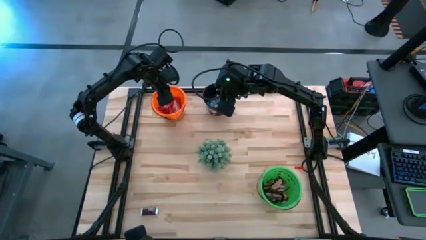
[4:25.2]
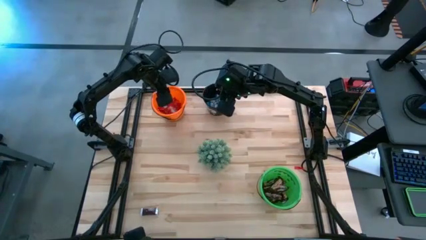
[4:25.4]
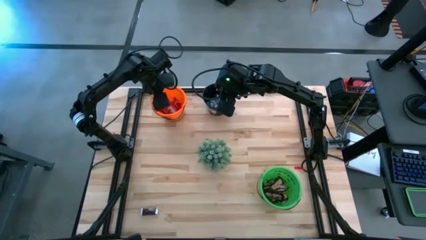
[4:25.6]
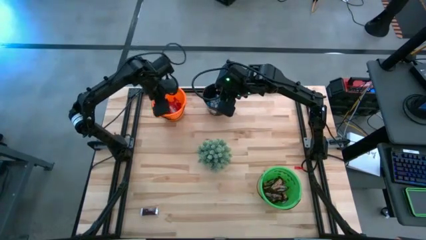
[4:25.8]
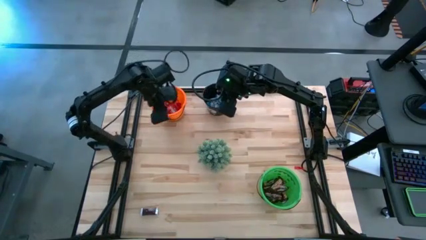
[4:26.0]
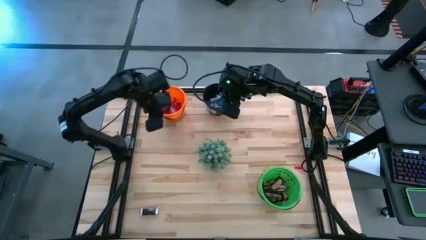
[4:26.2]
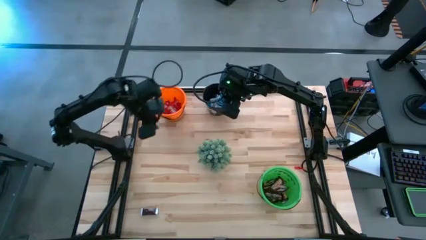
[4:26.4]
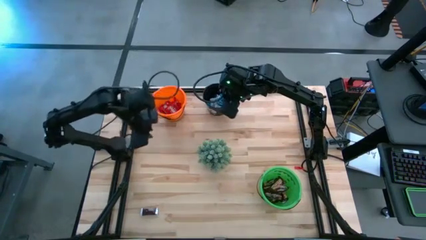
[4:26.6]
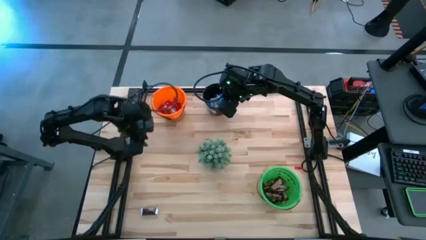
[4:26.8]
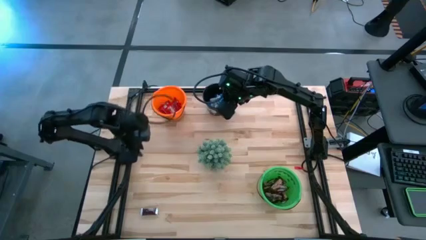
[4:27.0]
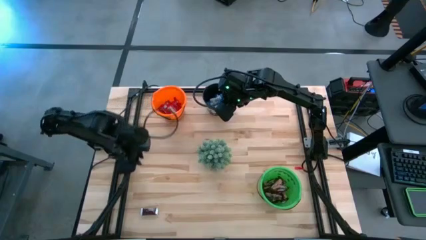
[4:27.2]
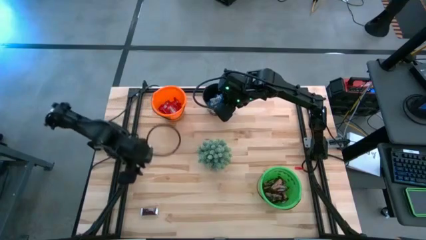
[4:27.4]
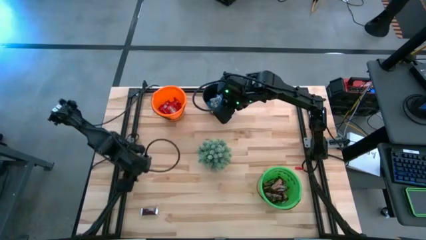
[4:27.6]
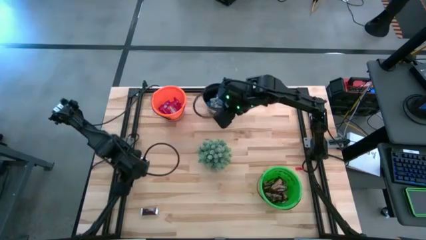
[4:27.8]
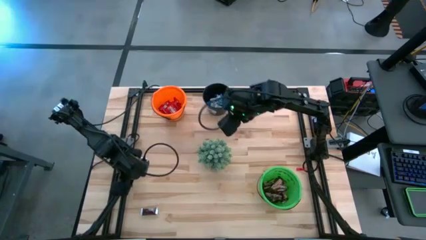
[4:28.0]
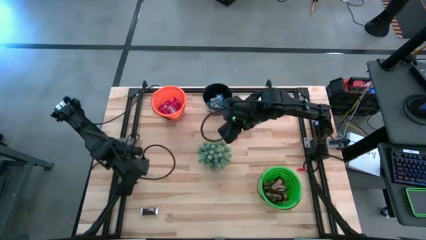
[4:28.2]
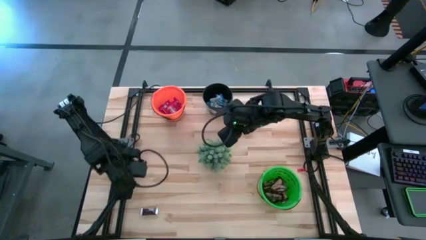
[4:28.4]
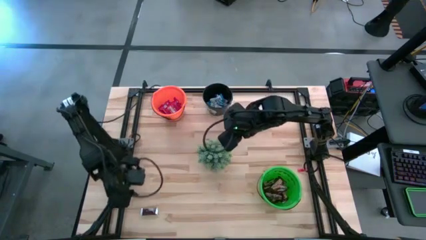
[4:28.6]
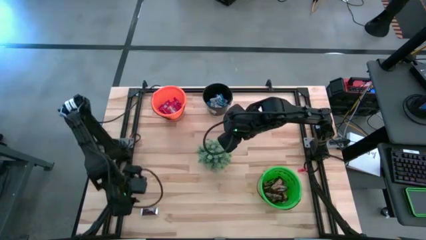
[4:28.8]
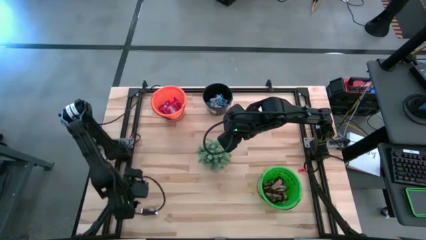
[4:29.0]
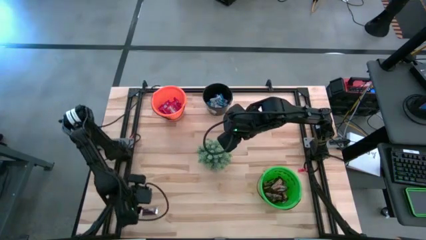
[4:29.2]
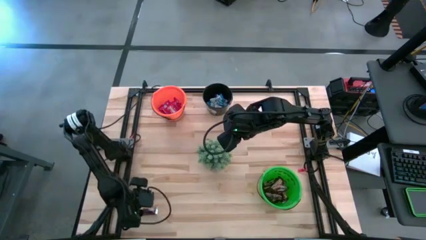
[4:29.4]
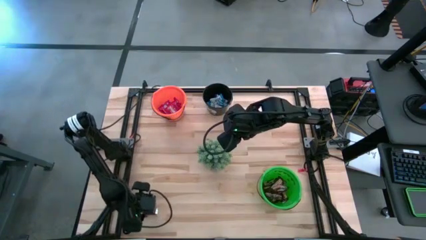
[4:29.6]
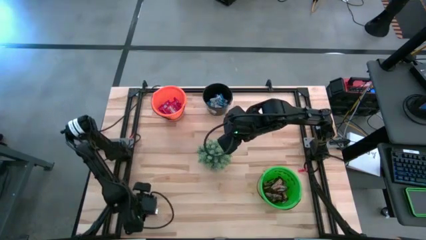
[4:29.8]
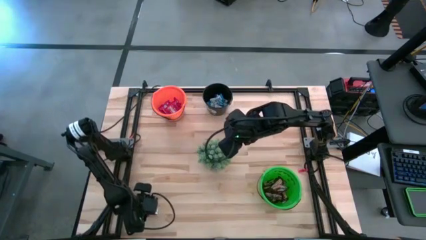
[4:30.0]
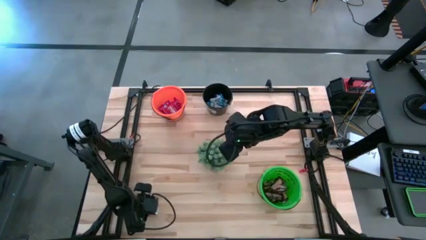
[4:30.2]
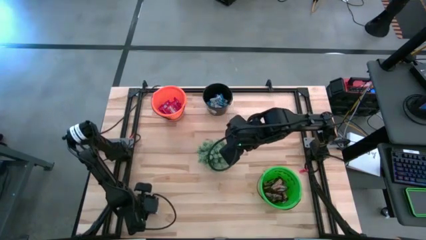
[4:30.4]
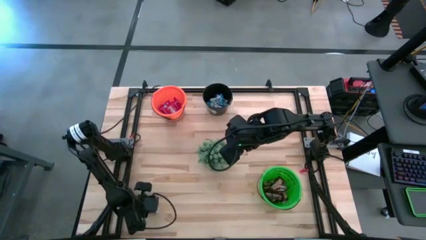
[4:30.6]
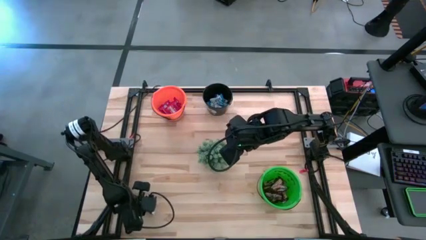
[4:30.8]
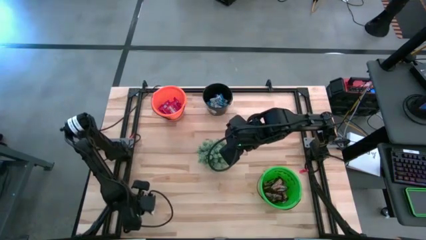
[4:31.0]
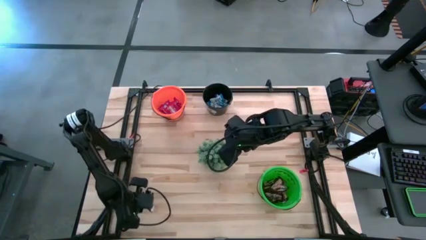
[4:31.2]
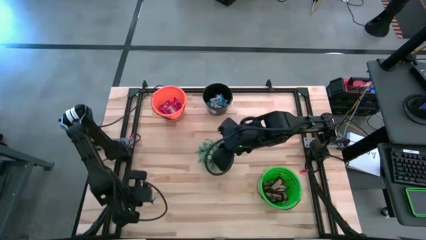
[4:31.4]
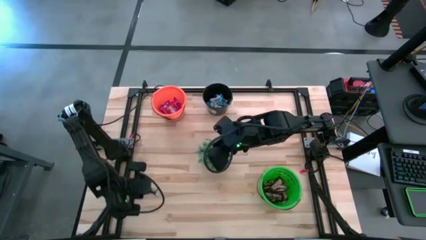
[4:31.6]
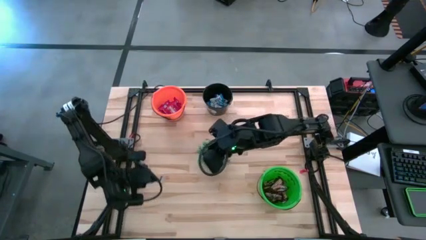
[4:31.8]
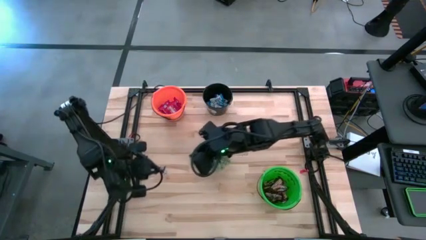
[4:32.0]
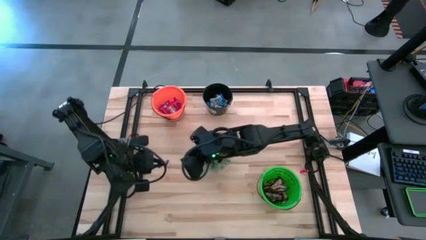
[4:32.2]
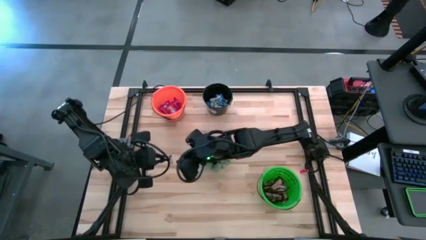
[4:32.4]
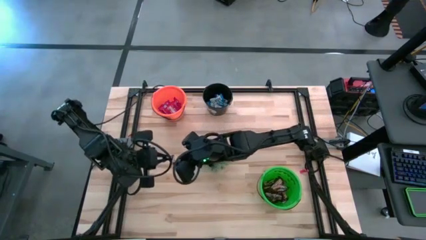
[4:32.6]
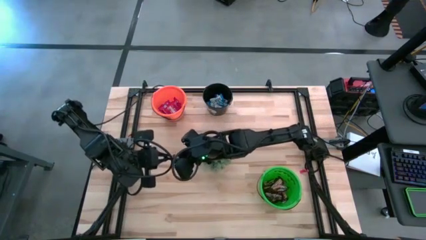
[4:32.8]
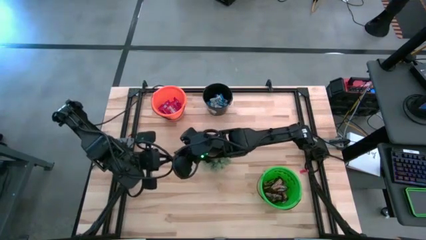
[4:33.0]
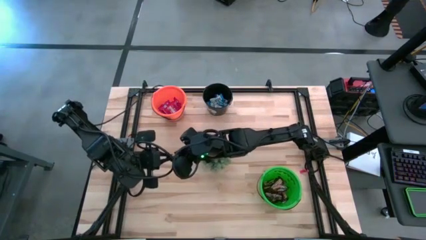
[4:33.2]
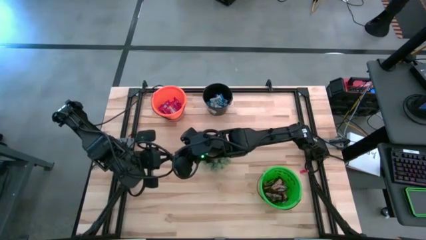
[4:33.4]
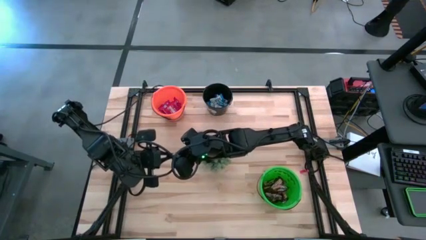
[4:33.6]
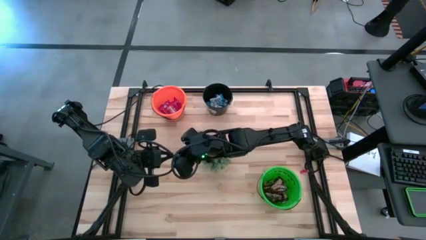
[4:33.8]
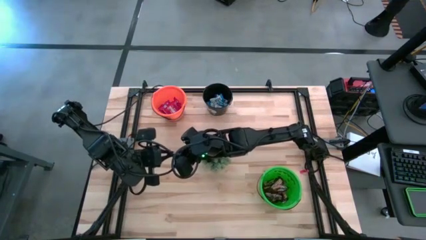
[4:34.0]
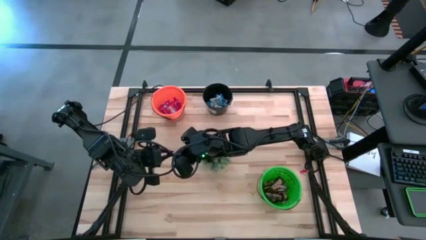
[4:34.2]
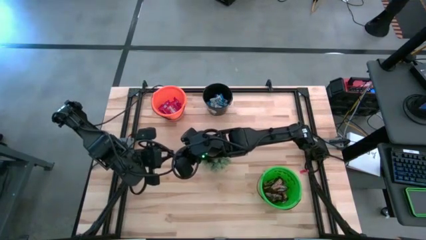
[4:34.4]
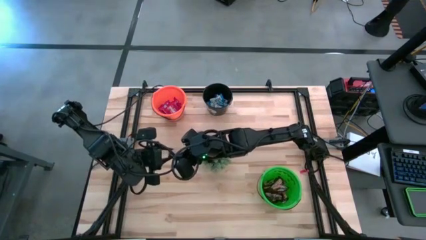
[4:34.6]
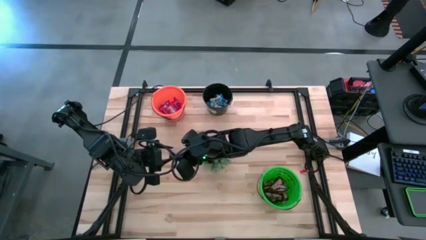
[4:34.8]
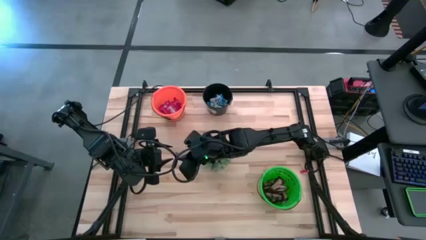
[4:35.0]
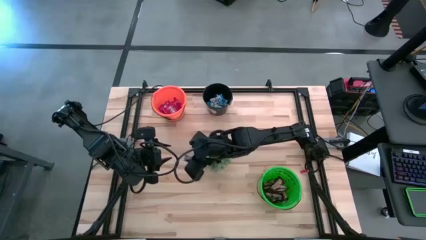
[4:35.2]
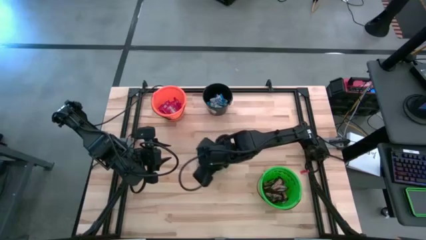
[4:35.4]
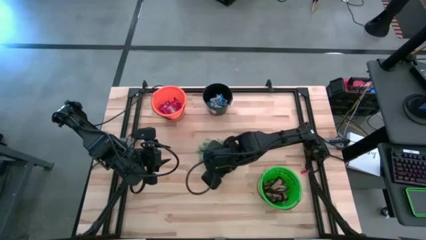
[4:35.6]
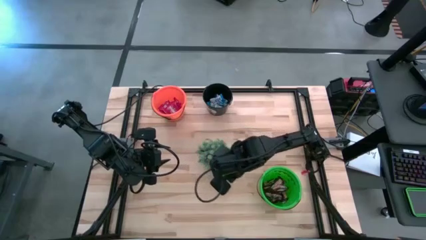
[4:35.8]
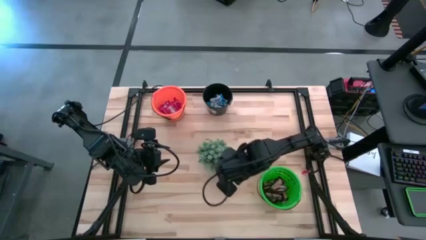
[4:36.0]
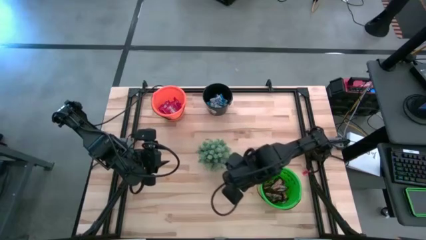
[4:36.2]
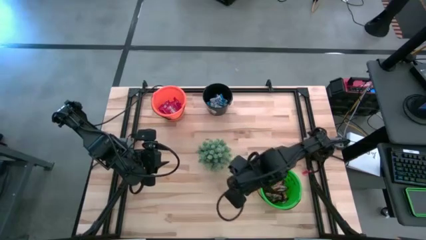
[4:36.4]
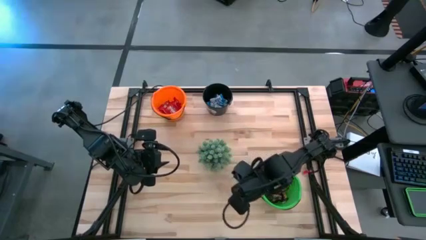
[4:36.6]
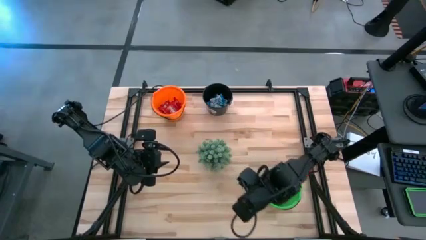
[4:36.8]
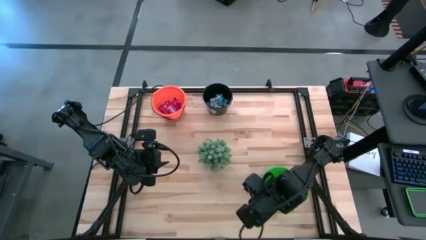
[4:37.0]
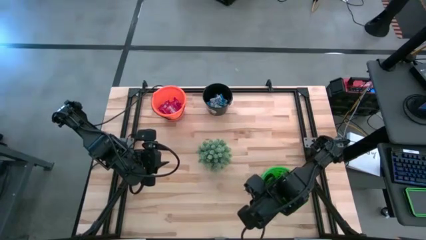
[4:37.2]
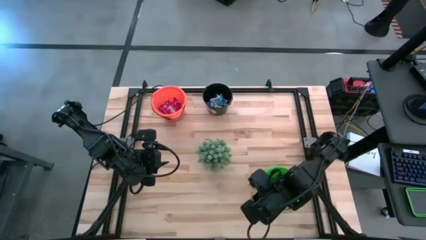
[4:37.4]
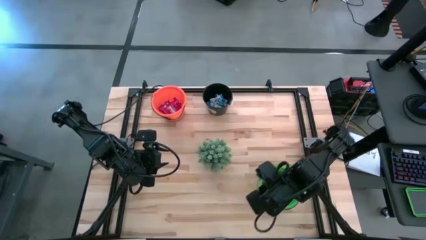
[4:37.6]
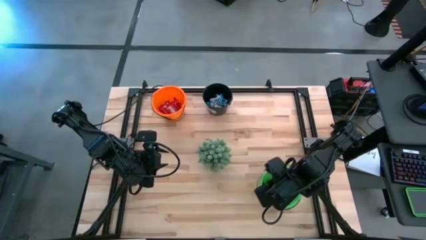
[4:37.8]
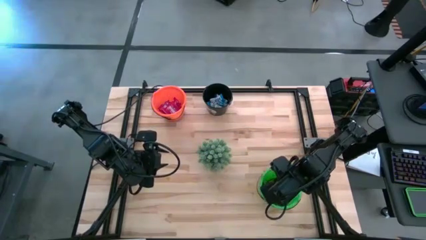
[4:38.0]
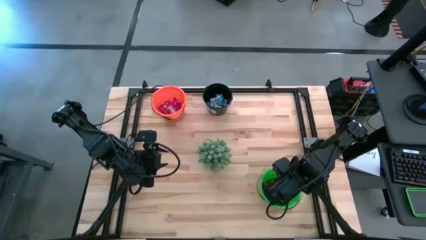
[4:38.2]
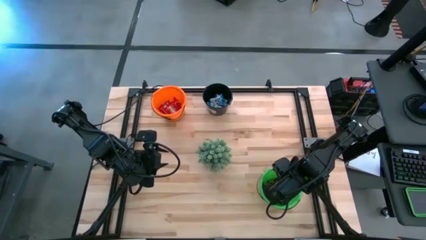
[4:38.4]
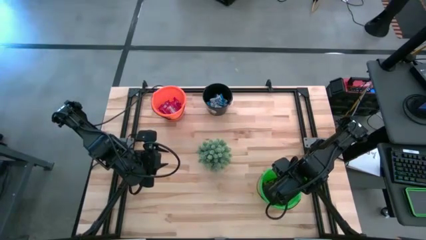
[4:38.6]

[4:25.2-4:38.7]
Task: Organize candy in baskets
Put the brown chocolate bar into the green bucket
